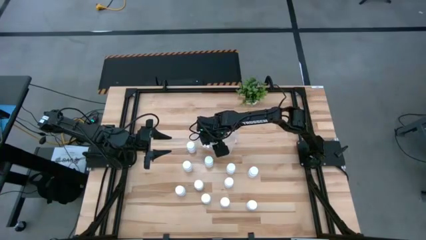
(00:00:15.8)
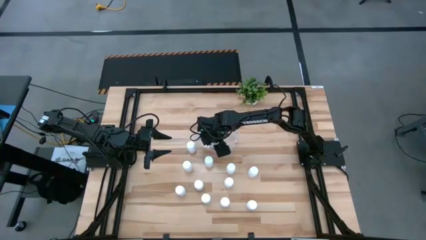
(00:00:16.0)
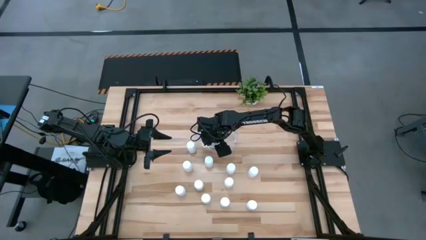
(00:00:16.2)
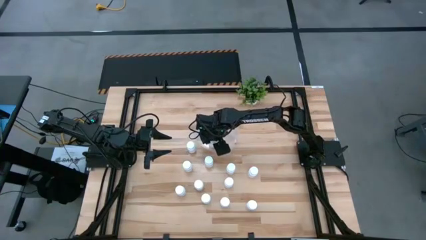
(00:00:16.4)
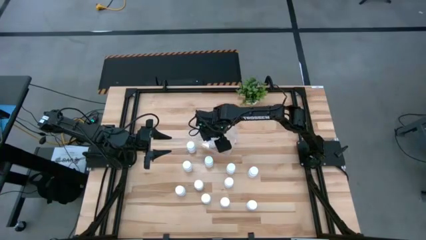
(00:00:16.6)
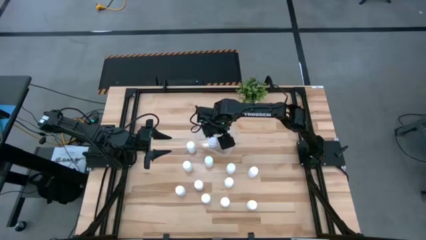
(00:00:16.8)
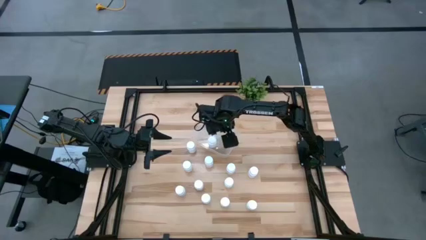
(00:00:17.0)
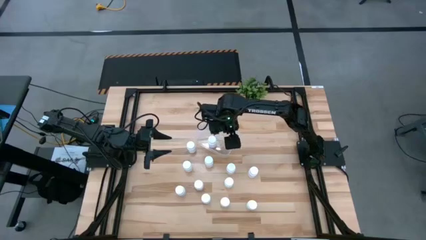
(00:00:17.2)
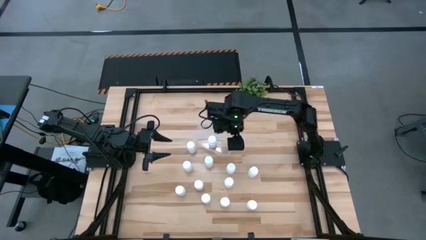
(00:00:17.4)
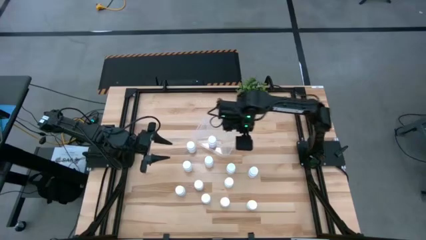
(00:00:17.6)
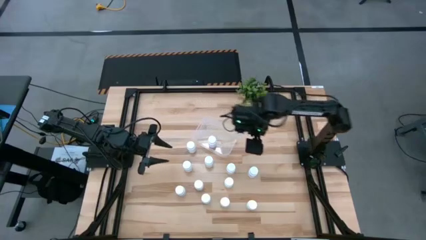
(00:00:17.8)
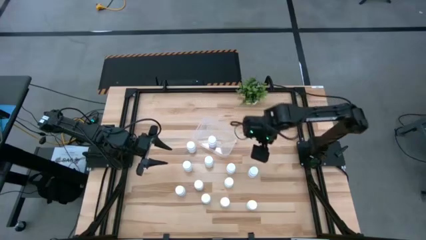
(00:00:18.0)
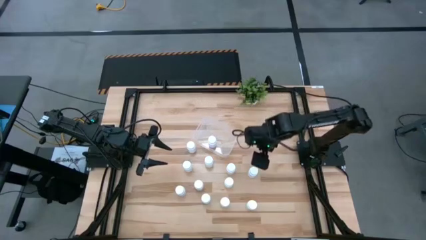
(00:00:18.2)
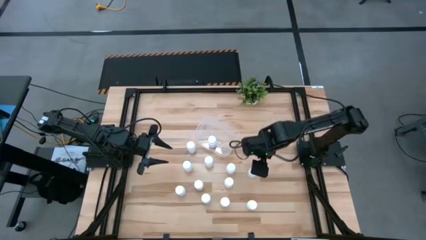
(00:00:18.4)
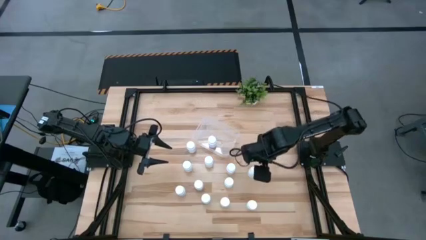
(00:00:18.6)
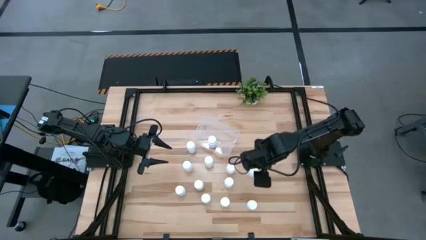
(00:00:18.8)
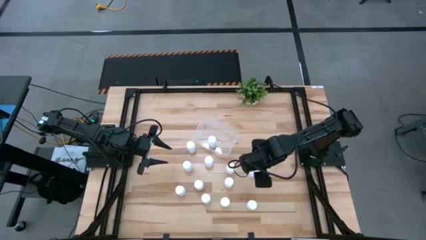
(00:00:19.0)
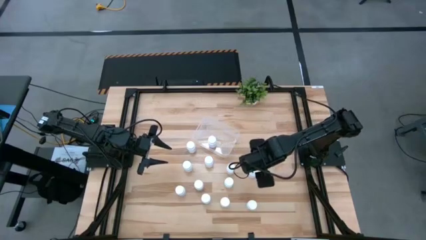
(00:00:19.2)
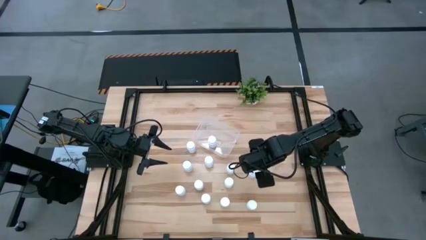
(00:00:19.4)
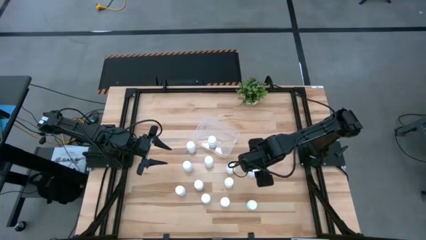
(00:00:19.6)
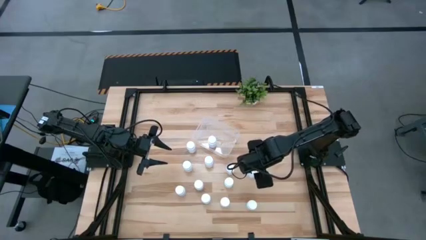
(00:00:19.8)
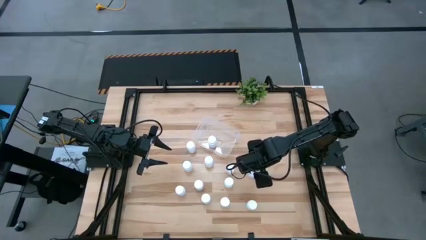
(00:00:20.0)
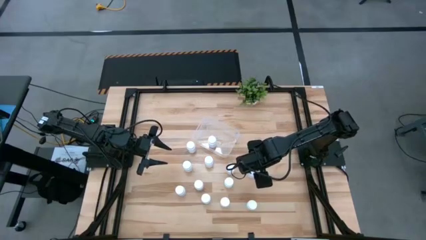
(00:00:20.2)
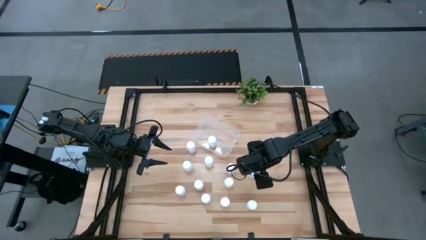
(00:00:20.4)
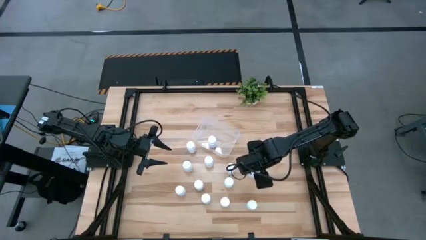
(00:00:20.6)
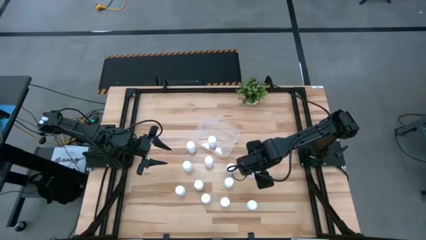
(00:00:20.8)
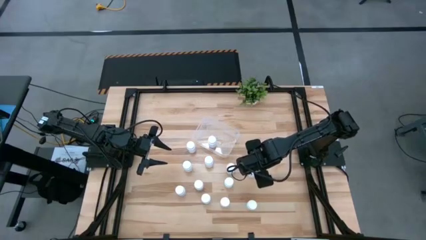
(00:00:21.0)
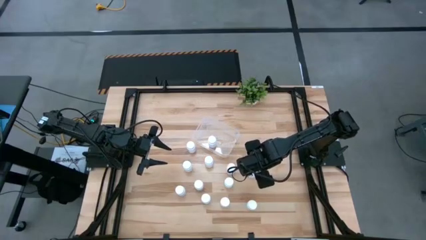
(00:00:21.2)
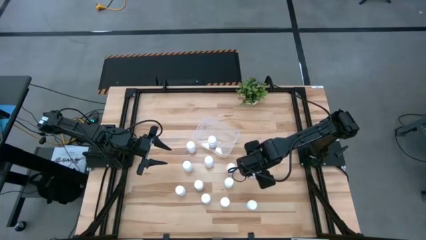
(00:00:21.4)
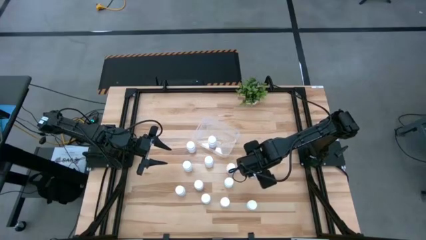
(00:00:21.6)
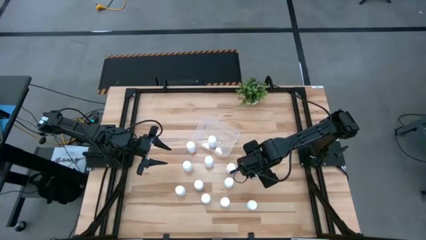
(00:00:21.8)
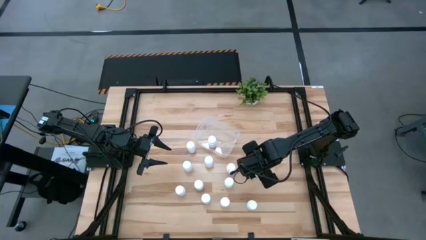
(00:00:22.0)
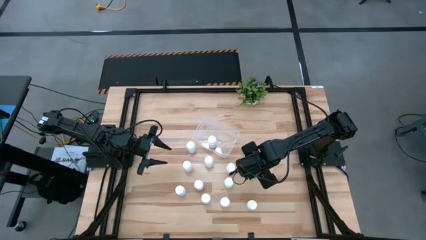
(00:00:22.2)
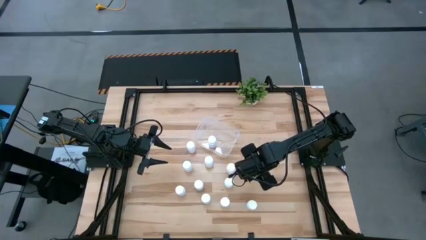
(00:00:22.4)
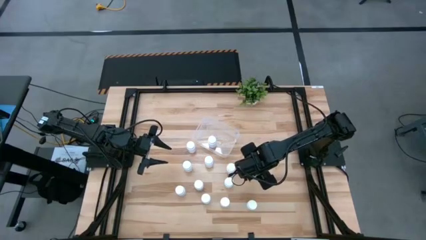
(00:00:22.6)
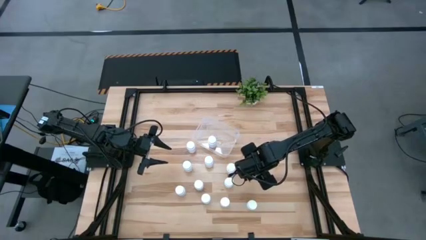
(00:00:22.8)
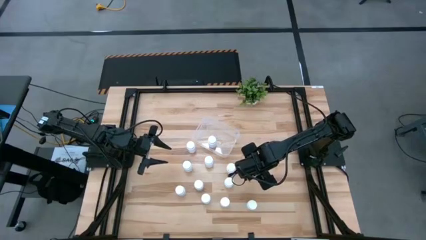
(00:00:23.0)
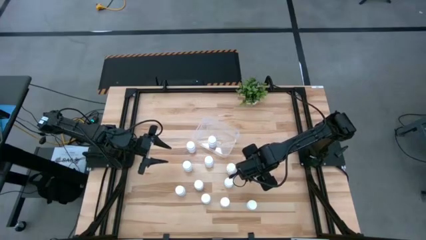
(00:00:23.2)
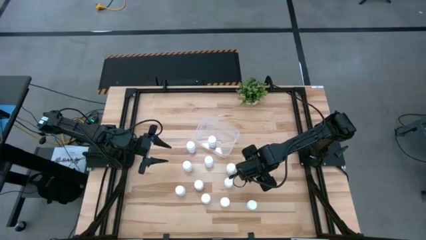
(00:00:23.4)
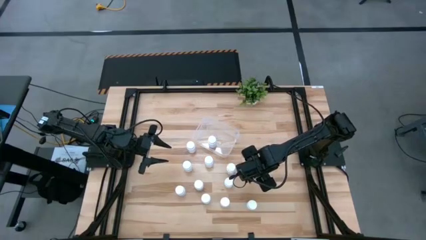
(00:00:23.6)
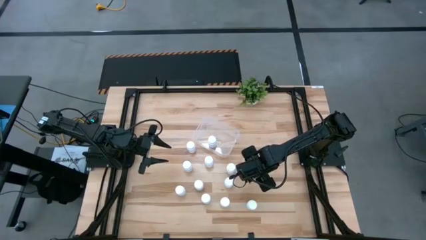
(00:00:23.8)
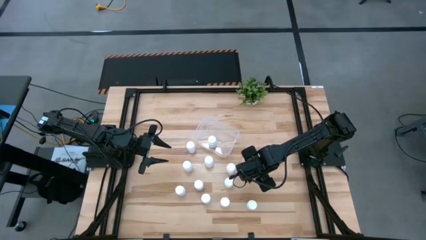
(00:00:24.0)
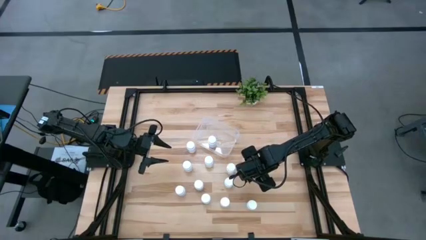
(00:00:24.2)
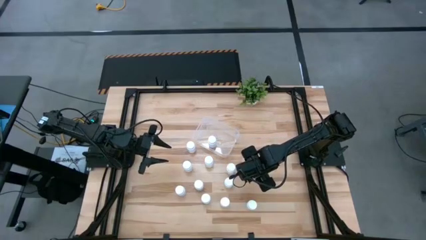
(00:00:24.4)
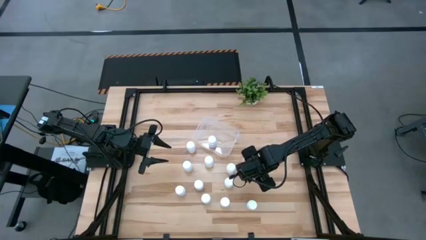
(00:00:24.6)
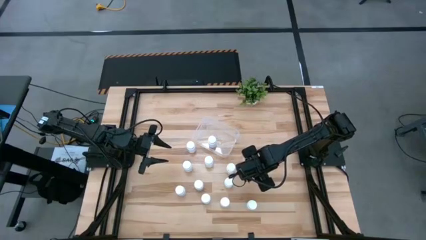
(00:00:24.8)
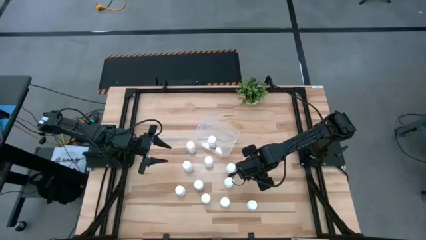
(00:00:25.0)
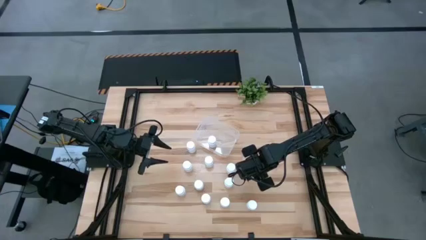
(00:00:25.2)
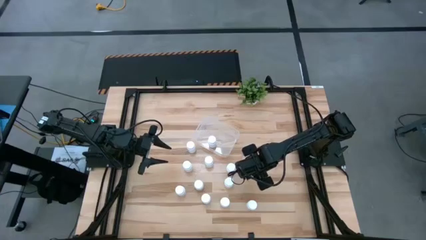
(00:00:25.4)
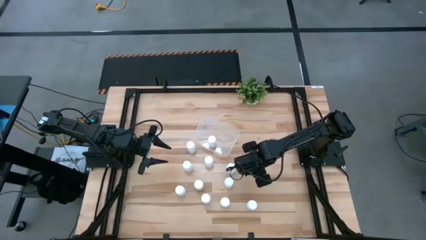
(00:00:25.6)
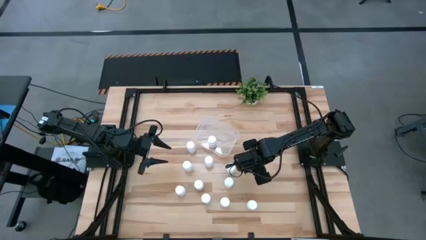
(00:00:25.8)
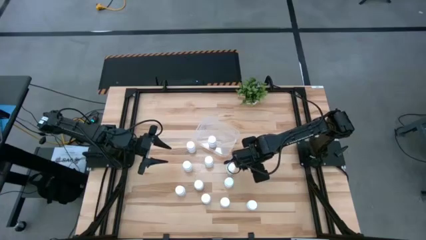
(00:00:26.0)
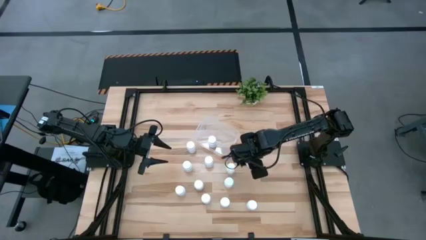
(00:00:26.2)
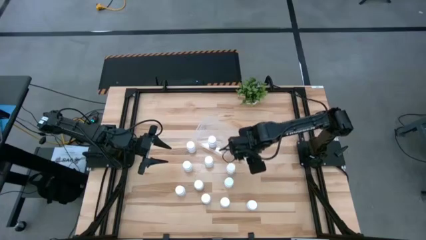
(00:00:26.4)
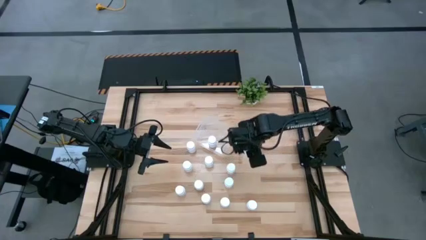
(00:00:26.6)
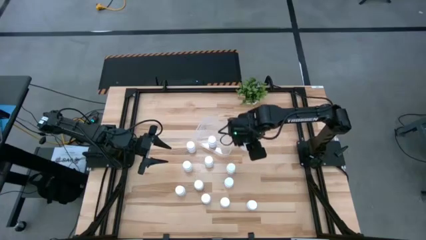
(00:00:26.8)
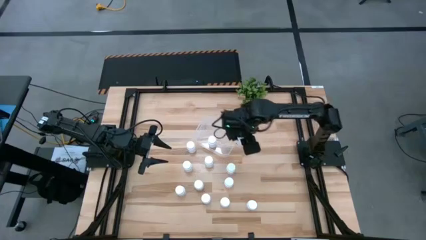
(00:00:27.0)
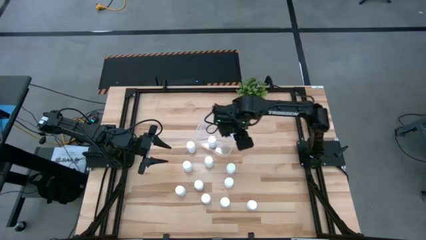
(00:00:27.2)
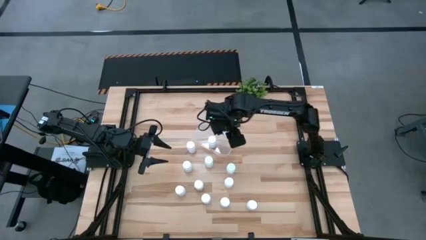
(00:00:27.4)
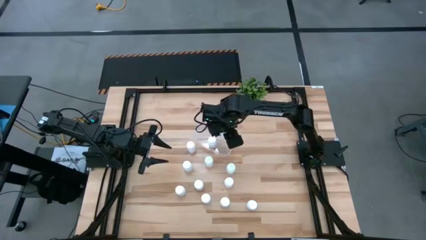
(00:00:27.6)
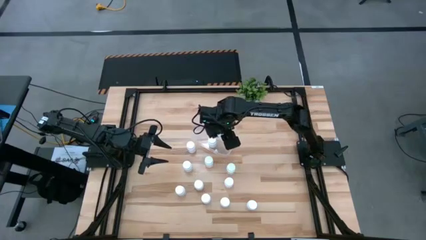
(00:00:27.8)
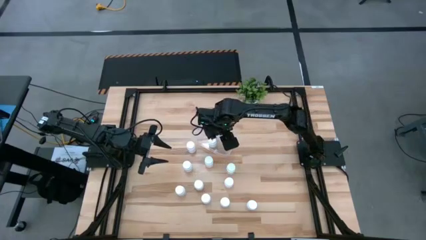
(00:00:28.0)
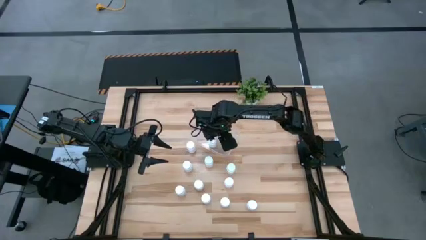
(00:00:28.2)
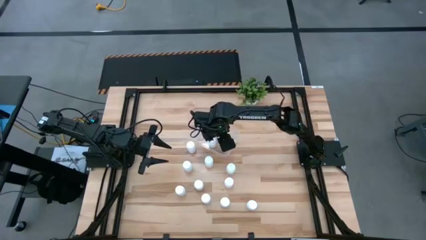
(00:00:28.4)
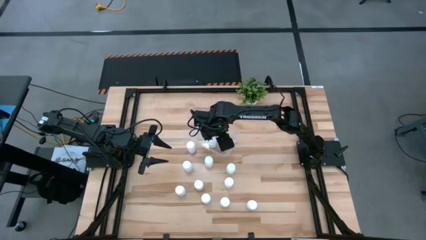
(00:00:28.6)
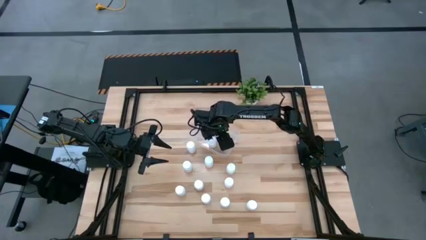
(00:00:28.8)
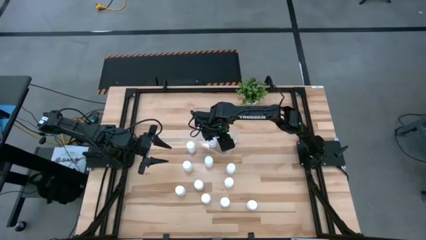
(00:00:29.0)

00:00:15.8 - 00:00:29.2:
Task: Pick and place pill bottles into a basket
Put the pill bottle into the bin

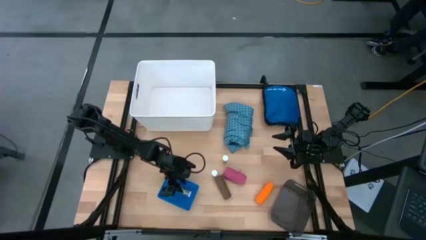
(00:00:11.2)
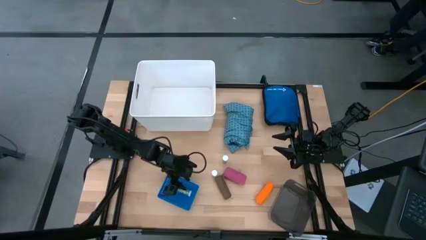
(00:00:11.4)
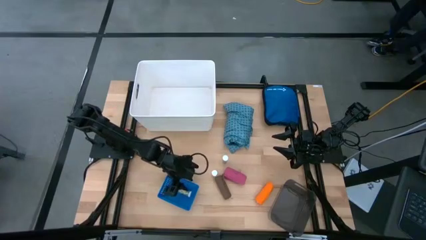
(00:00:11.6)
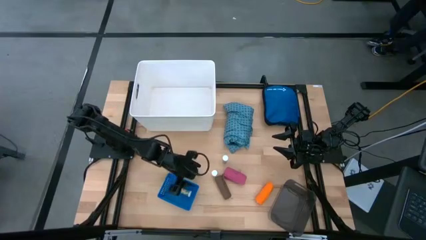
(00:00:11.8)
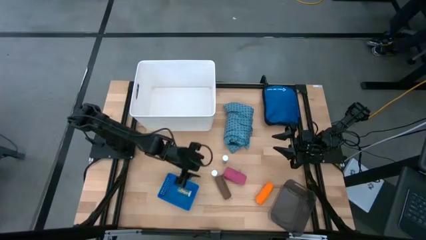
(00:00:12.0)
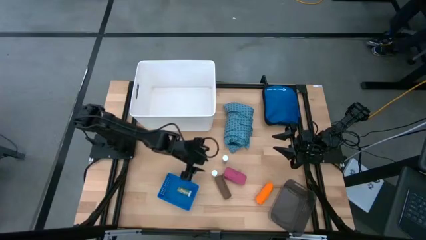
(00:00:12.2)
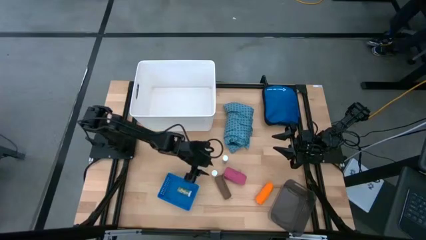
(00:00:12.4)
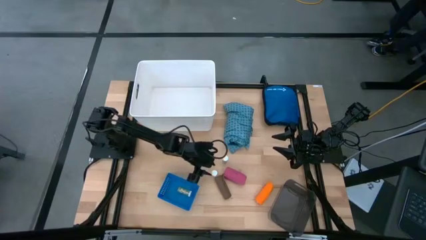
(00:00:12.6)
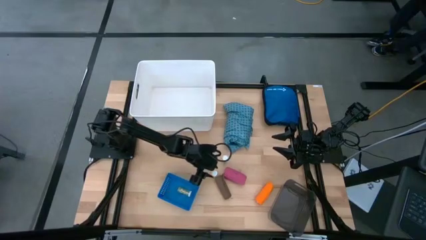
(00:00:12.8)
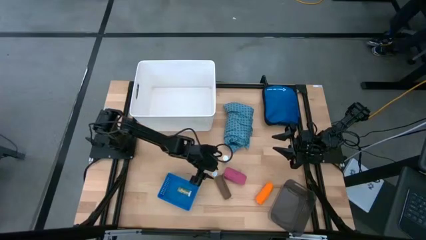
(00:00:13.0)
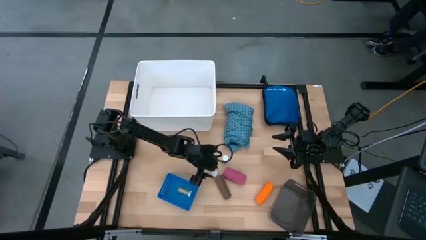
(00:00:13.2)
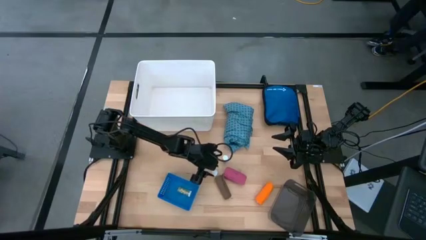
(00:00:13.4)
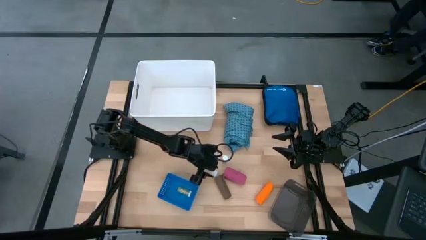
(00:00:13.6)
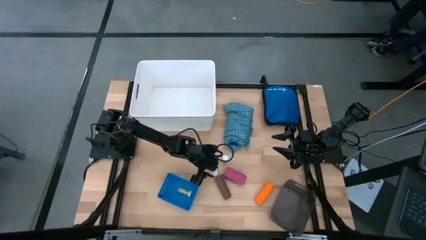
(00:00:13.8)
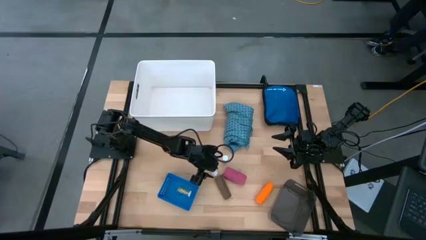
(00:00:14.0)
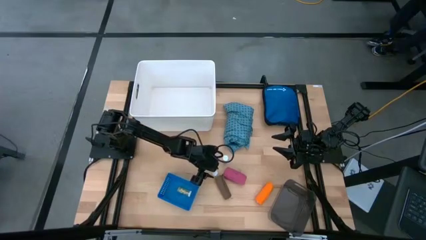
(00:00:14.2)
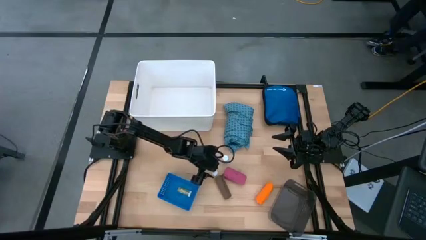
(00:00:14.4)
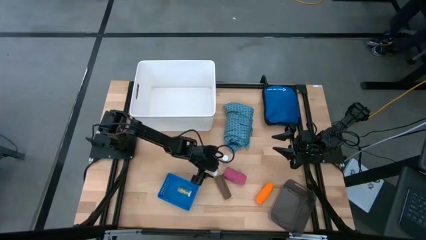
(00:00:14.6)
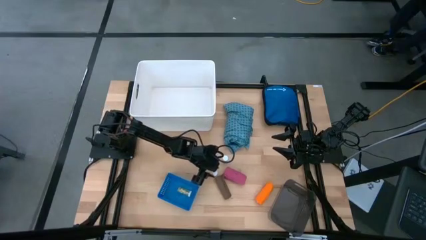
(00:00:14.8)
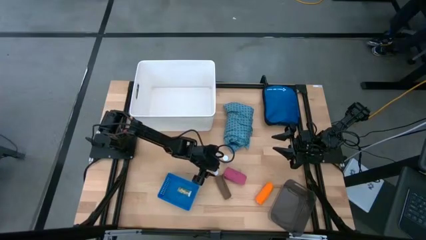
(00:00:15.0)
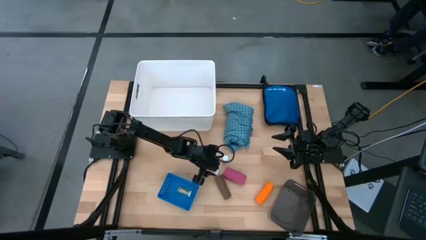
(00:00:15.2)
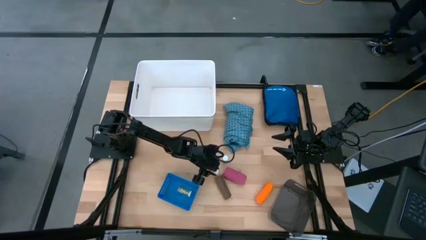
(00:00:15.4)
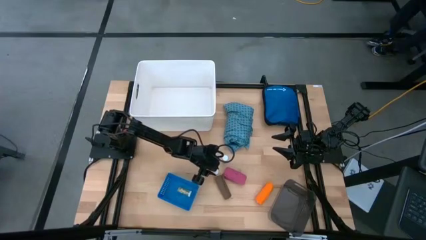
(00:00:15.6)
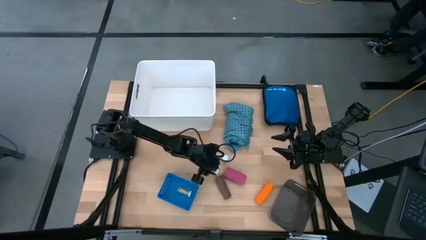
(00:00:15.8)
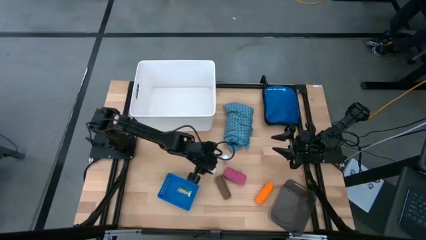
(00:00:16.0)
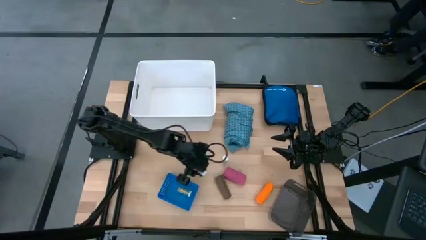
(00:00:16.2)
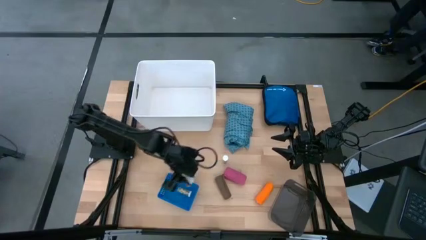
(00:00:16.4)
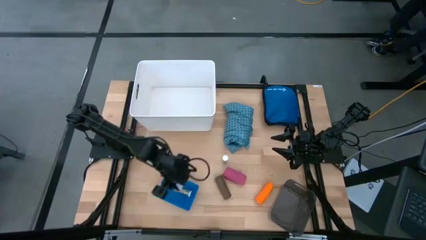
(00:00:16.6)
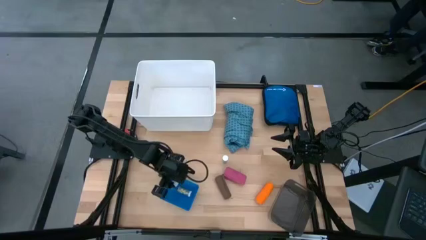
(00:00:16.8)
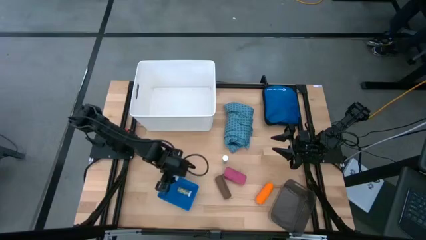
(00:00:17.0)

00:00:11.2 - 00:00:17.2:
Task: Pick & Place Medicine items
Put the green medicine bottle into the blue bin
